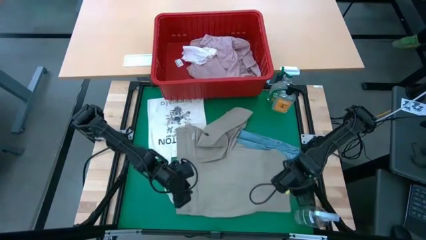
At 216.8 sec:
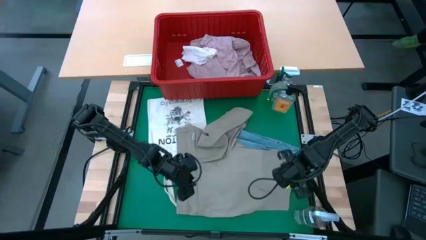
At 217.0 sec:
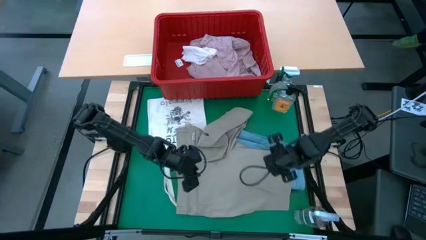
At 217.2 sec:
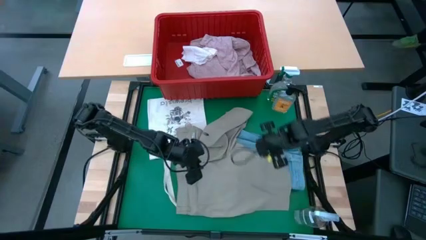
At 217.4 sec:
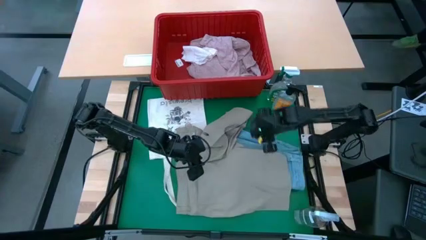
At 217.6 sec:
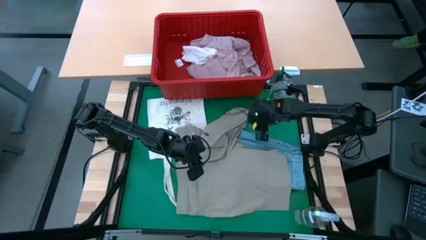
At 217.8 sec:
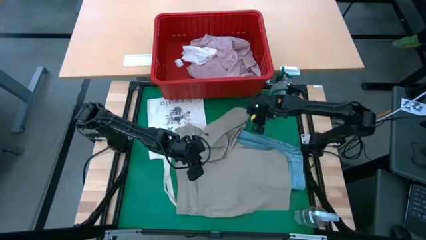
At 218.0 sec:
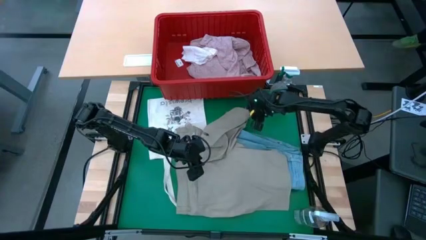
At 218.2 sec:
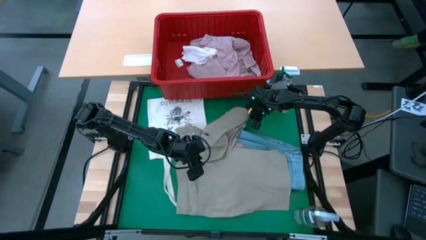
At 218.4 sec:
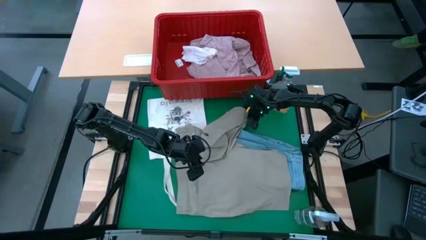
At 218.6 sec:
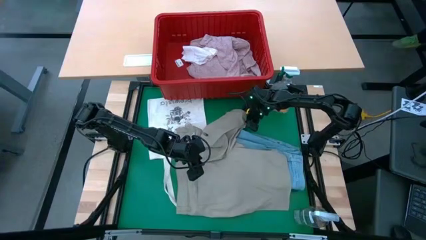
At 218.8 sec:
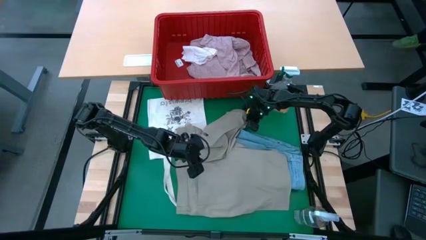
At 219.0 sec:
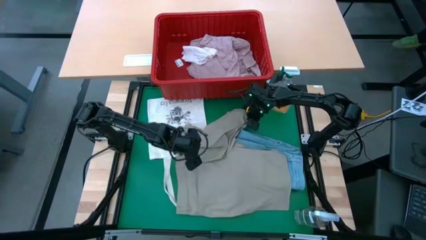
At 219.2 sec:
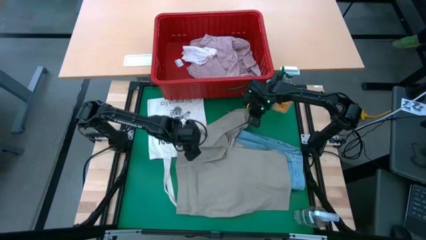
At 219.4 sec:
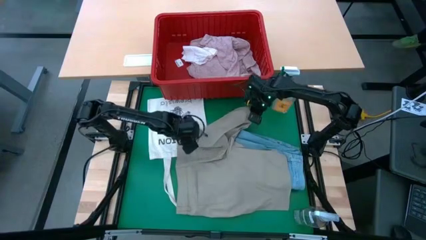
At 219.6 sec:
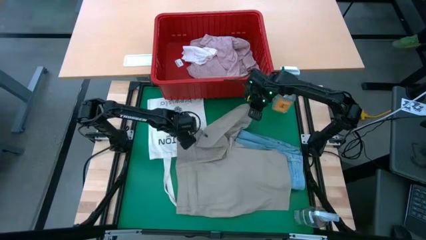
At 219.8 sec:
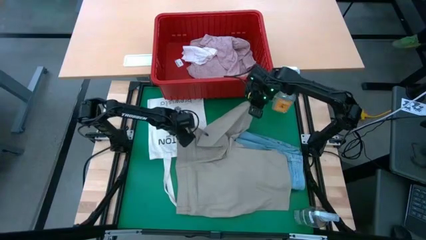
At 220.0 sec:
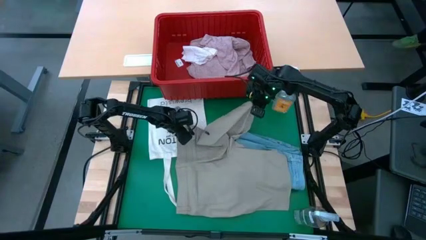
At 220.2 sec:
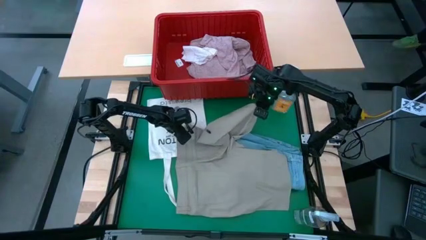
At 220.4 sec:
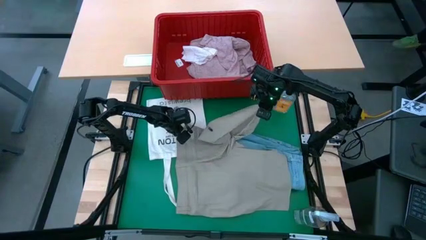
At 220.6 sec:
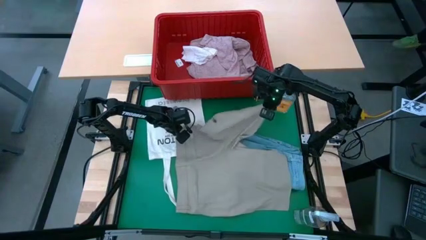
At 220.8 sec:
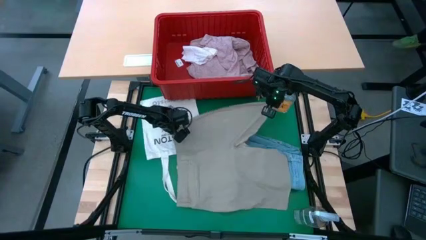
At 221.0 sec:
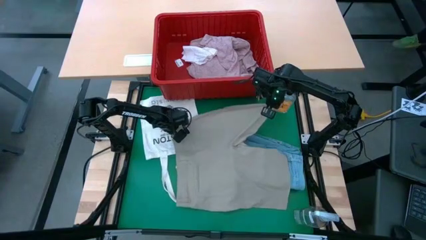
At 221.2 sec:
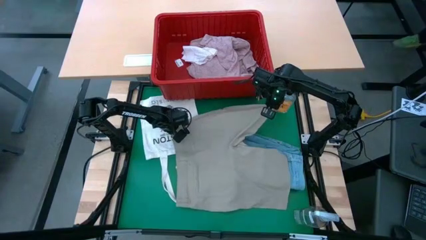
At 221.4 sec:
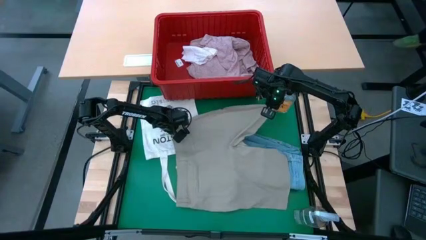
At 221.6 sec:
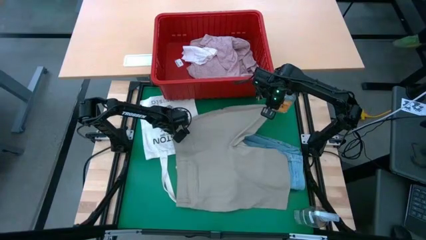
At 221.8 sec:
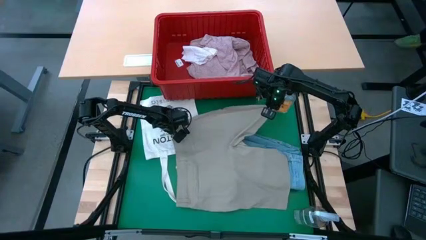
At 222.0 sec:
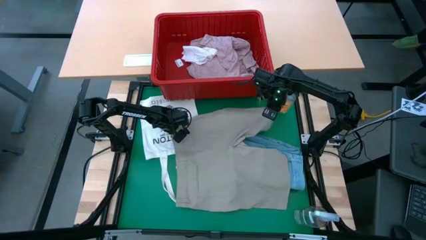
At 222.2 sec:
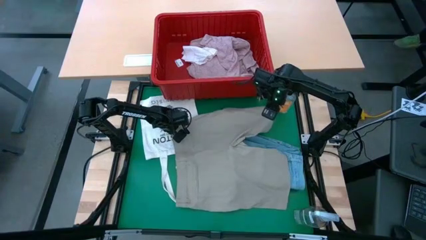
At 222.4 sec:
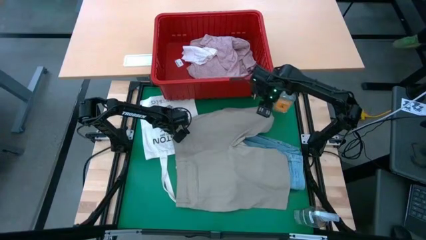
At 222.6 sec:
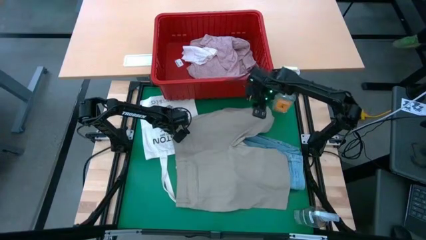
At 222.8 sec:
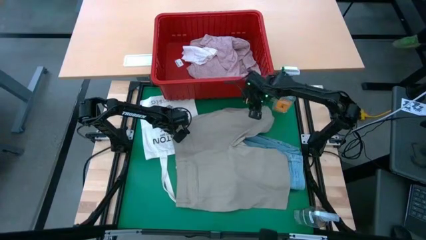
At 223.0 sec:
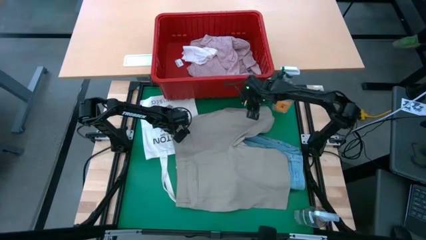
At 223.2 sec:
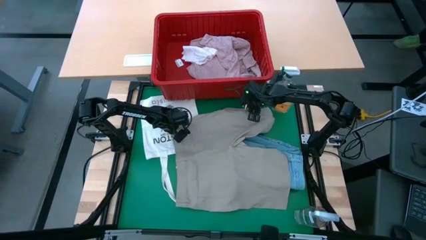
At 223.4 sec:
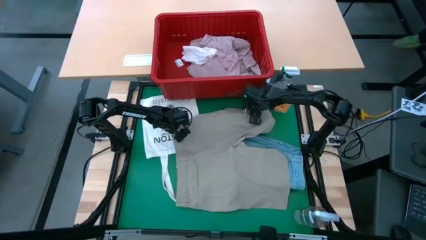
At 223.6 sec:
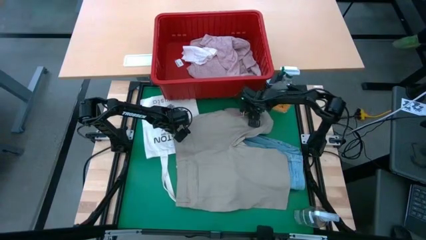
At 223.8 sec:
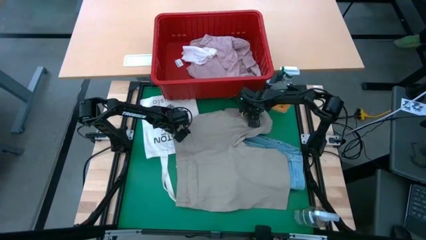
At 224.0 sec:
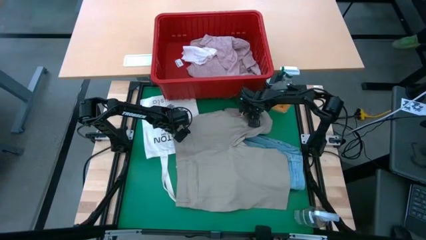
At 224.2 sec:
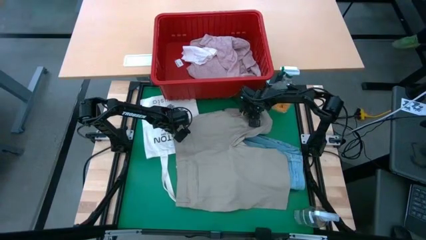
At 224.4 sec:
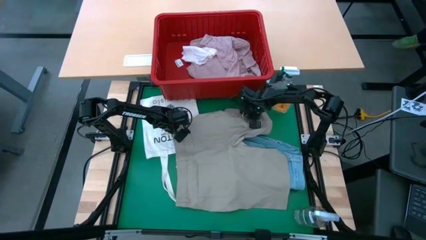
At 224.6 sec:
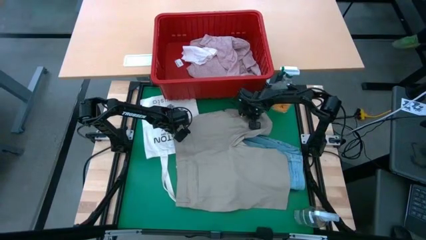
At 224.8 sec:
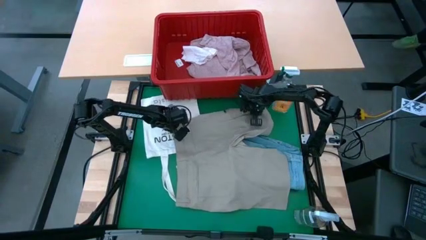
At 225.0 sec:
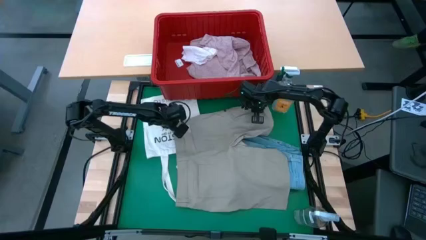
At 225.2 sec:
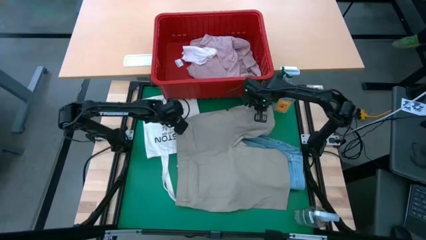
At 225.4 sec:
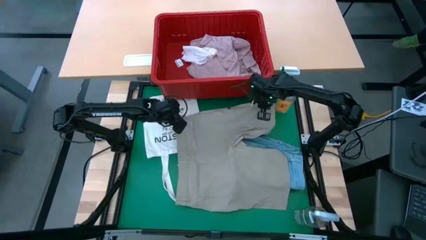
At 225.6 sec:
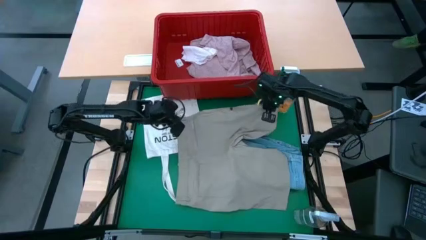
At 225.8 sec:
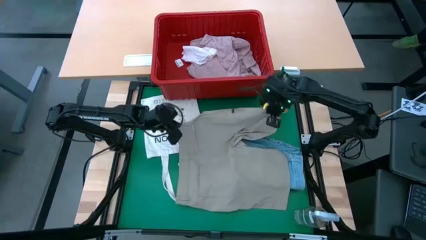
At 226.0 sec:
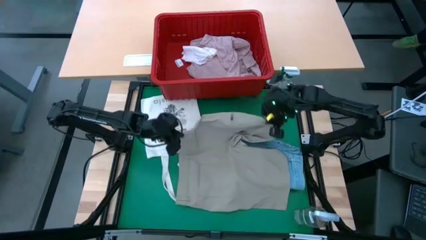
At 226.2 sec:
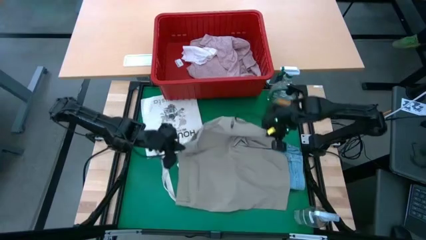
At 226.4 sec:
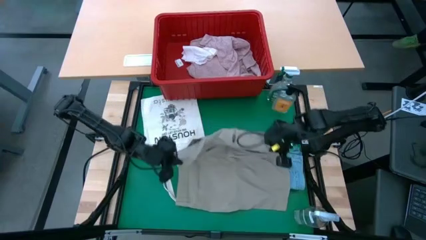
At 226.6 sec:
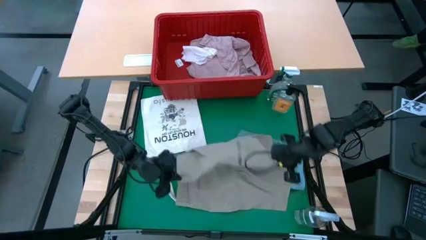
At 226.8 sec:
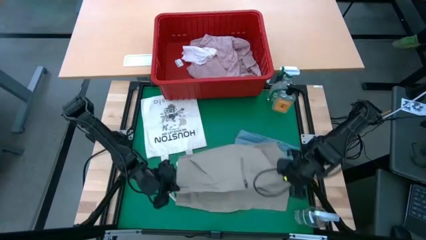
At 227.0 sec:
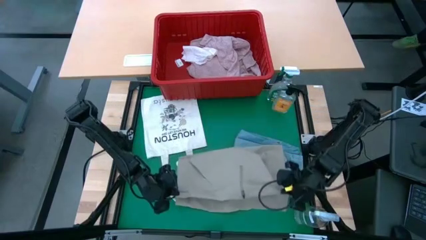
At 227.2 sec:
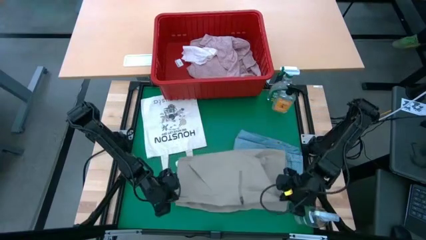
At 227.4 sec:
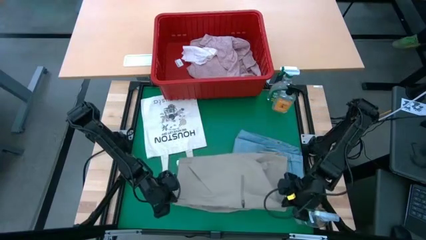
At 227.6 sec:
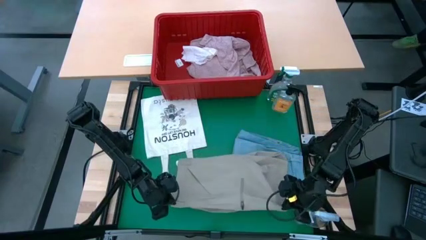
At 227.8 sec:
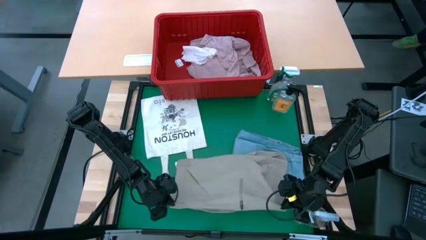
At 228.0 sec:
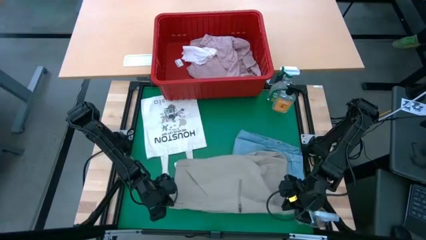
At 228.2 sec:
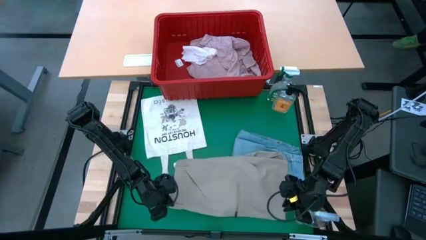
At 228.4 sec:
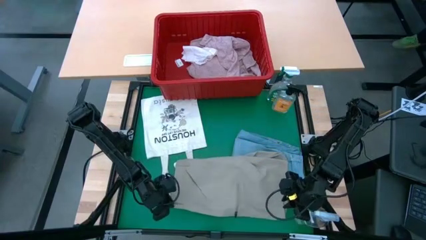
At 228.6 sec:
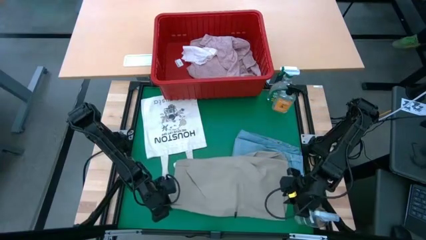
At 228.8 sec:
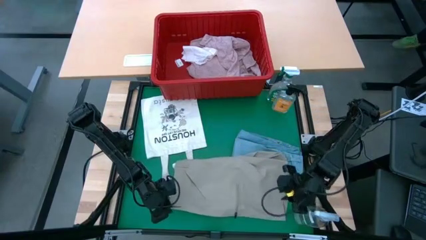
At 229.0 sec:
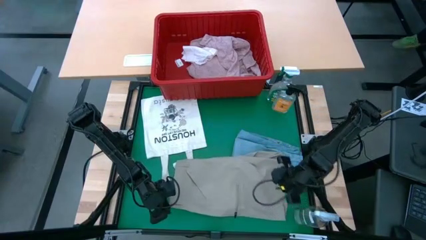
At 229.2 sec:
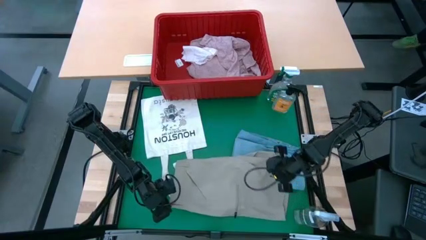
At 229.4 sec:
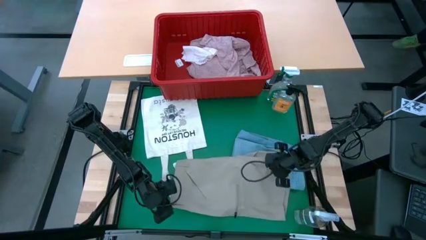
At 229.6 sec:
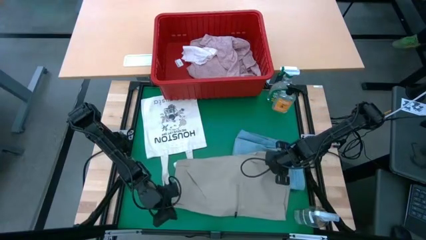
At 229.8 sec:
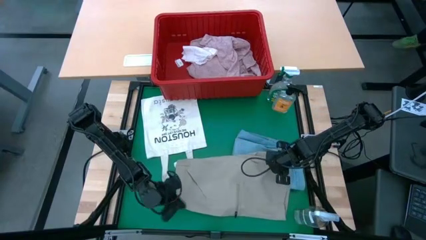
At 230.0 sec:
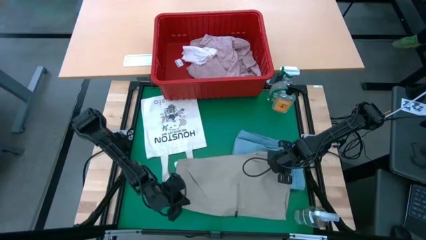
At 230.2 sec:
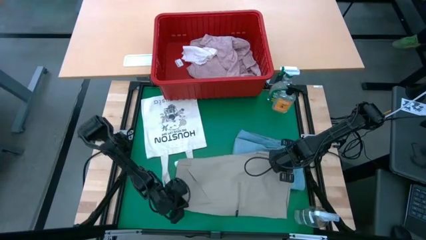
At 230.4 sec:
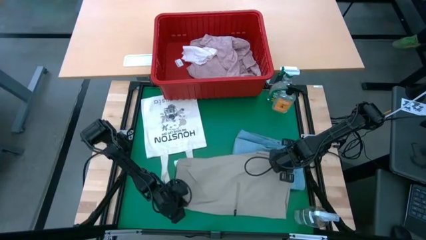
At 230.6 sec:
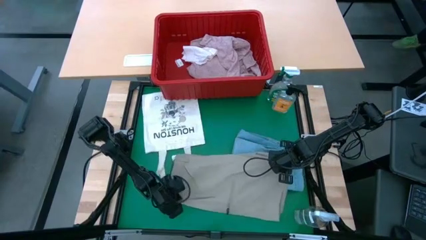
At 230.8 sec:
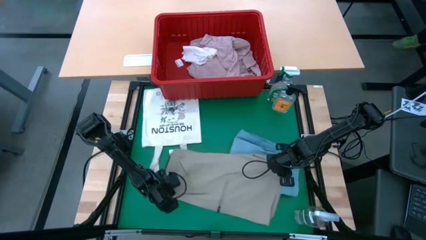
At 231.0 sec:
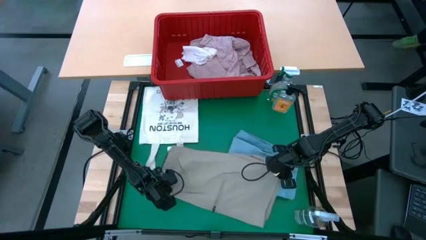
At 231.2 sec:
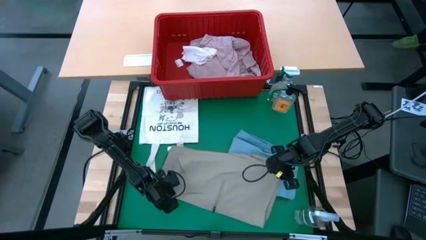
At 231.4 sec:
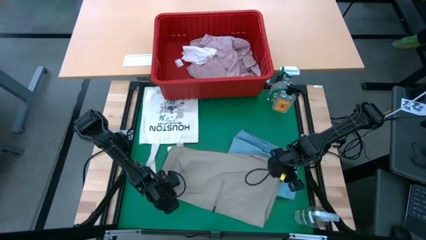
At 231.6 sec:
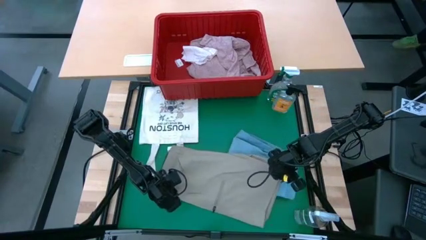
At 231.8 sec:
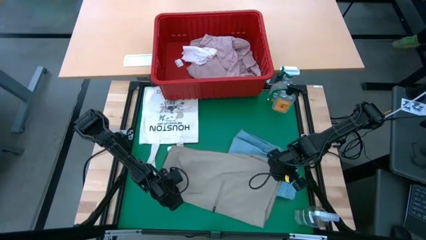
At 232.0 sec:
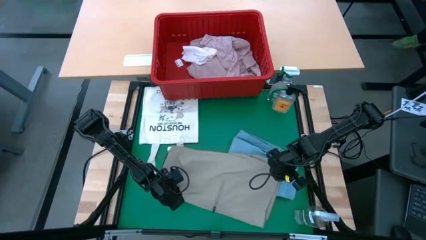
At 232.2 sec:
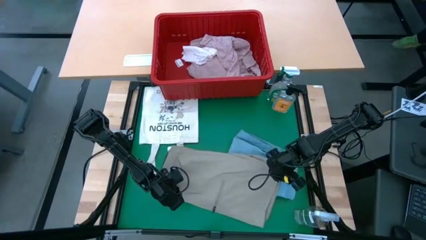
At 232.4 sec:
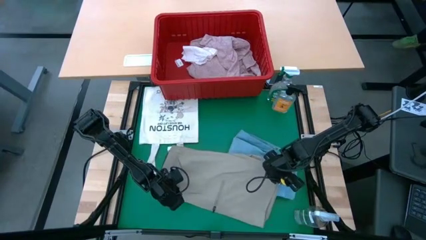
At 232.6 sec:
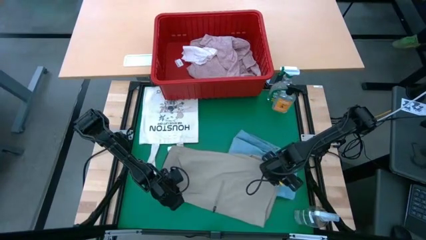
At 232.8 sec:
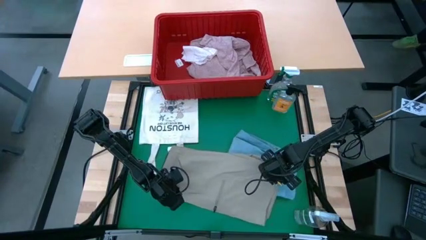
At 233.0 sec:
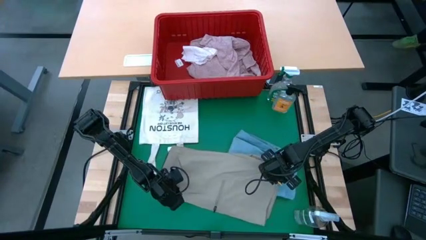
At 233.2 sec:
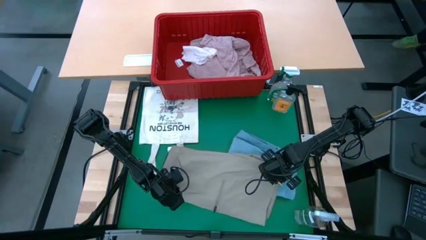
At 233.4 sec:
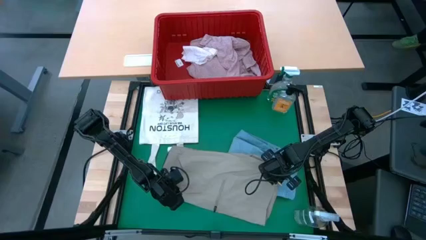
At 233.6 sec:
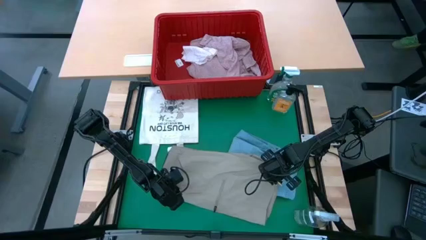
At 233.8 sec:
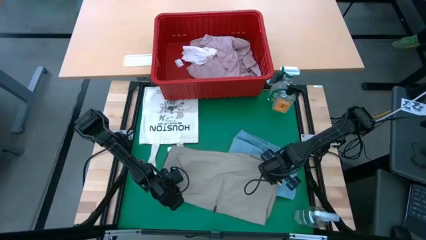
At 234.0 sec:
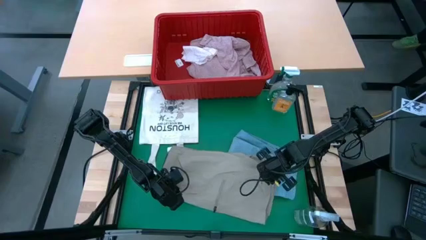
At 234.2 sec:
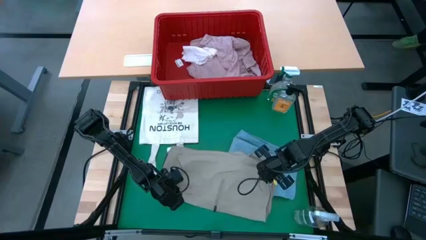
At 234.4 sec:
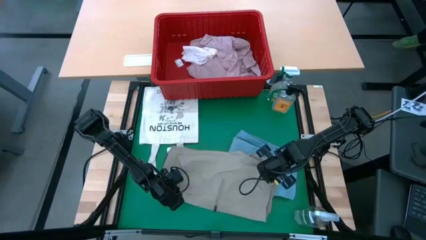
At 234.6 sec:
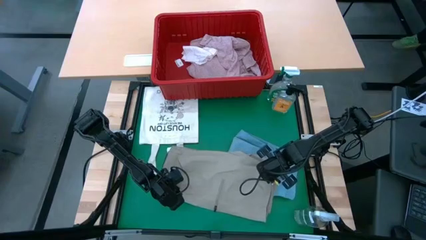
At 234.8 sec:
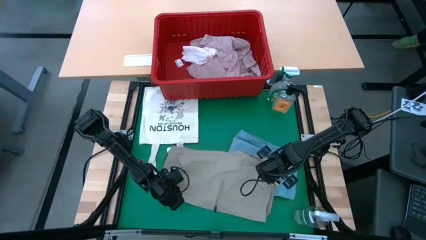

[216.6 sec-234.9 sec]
Task: Fold laundry
Fold the gray short
